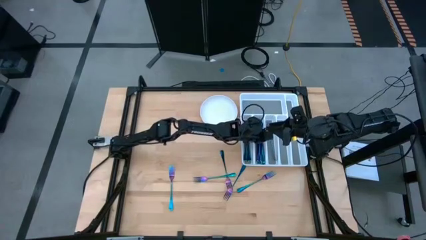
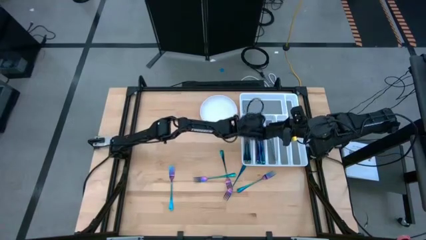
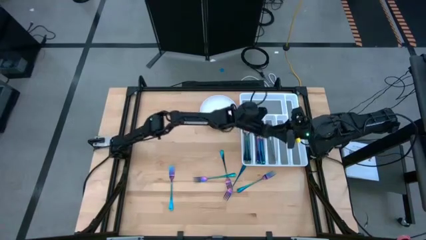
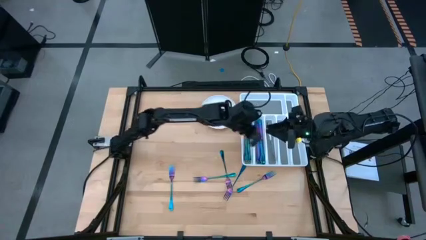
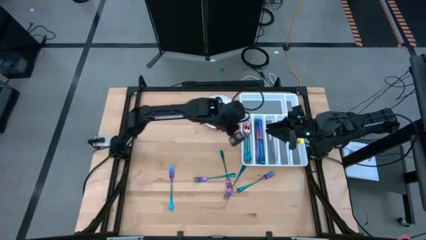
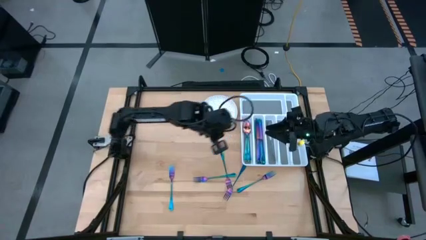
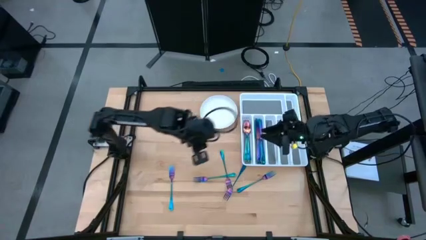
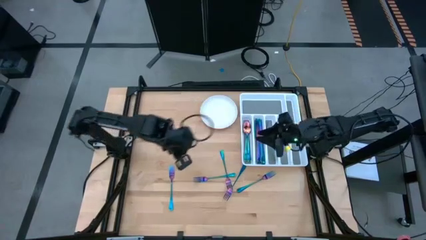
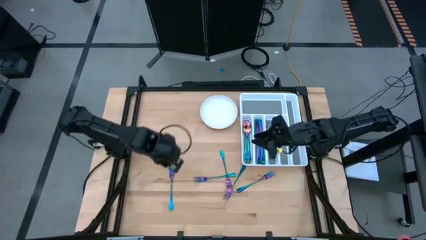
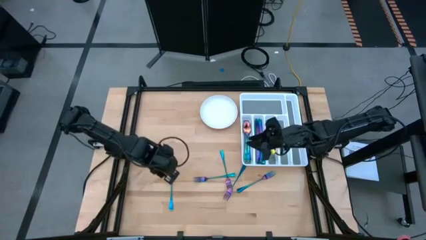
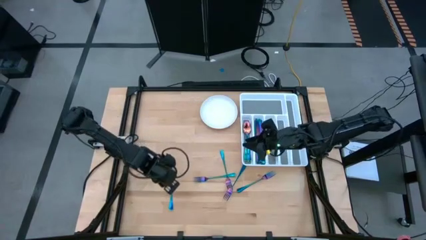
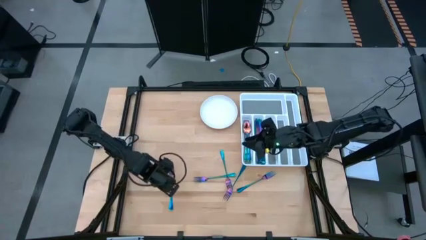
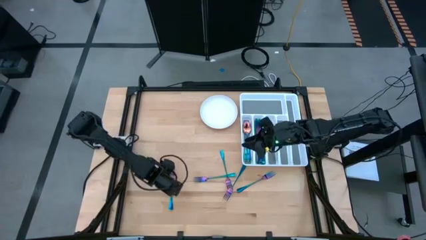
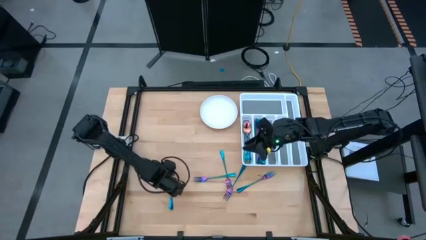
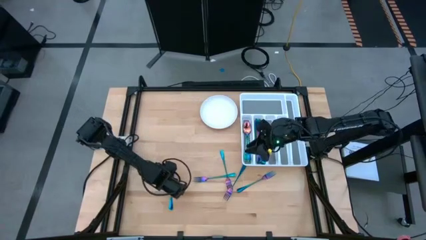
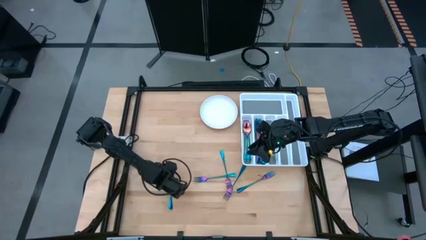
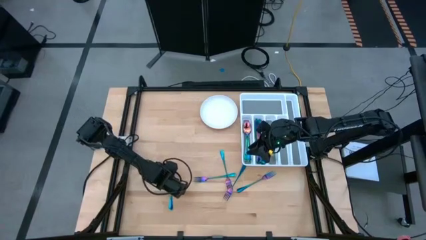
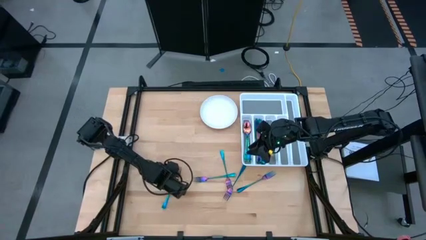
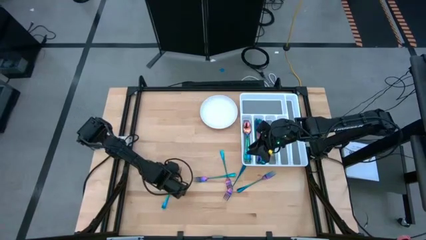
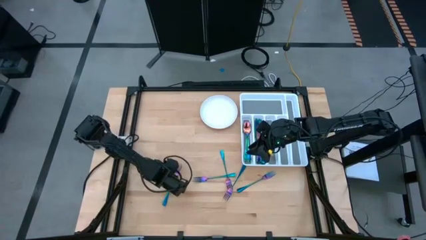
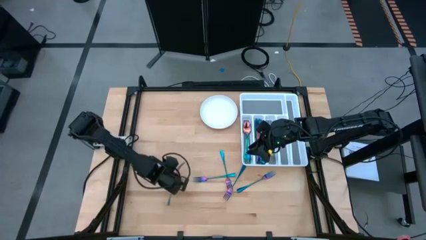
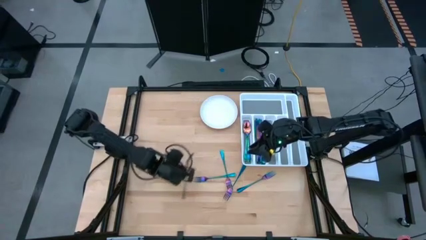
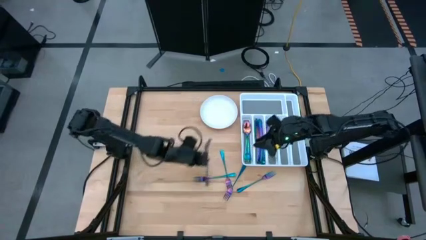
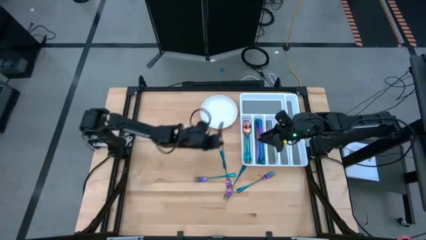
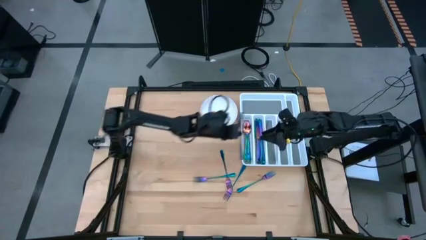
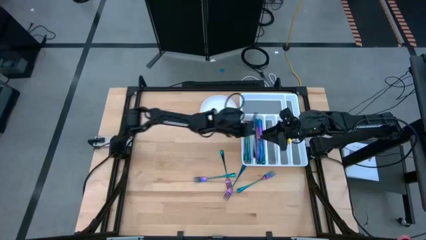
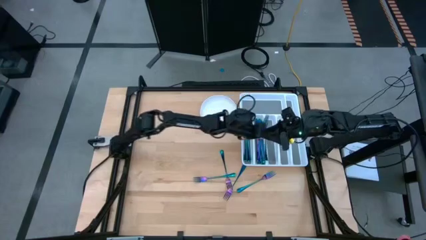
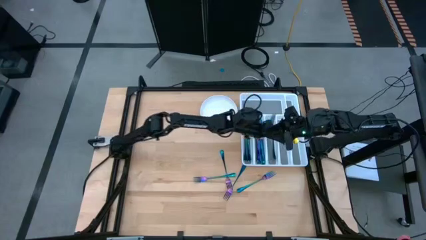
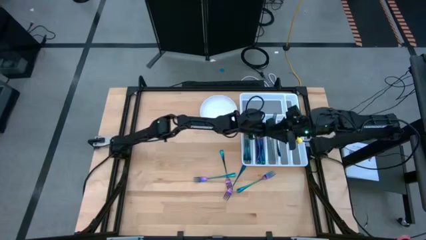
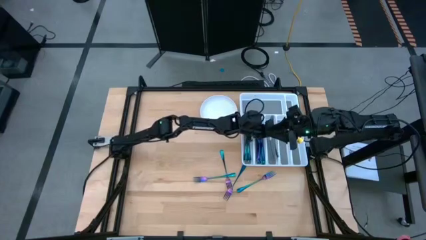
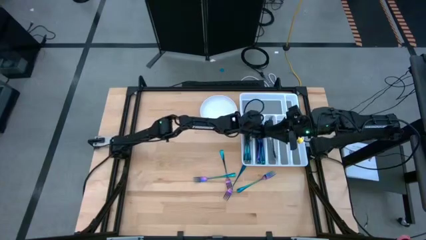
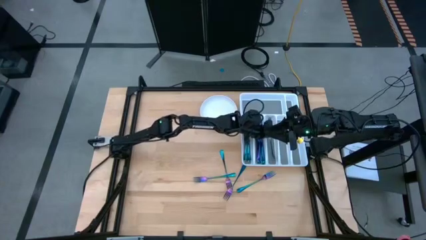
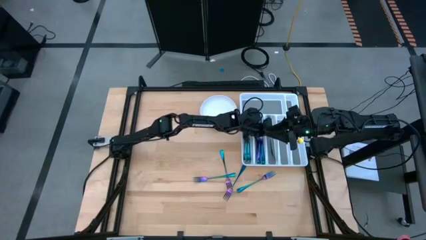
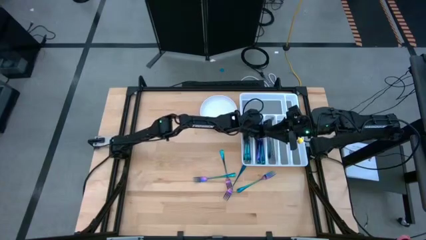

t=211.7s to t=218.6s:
Task: Sort silverware
Put the purple fork into the white silverware tray

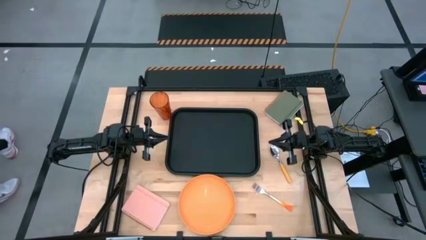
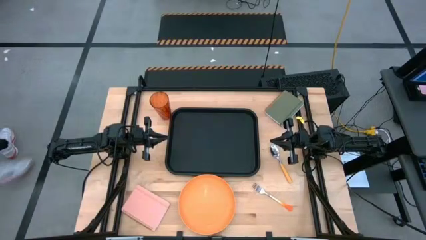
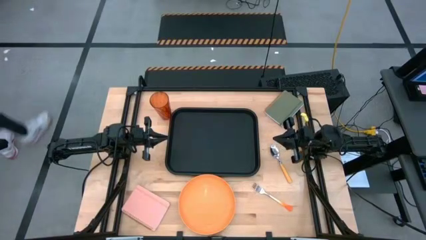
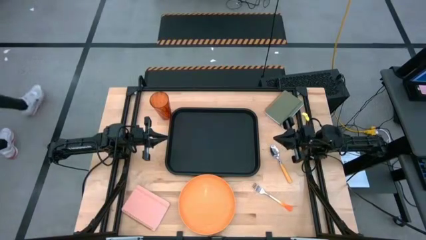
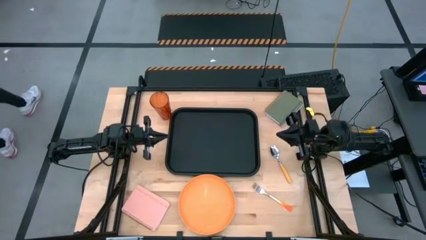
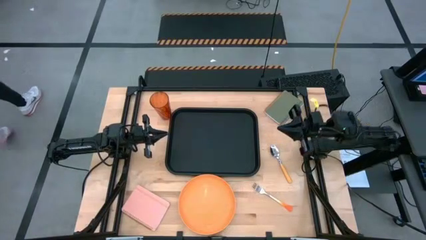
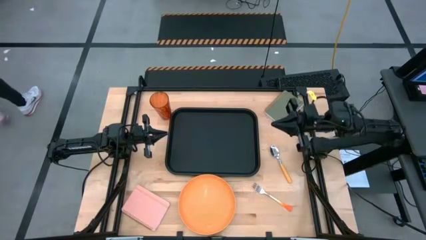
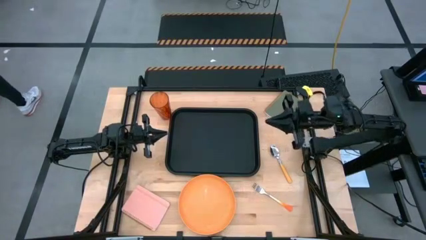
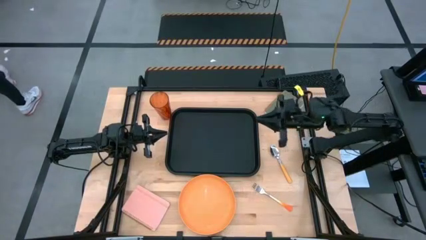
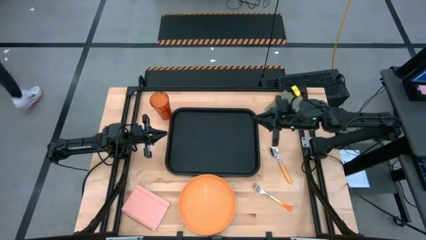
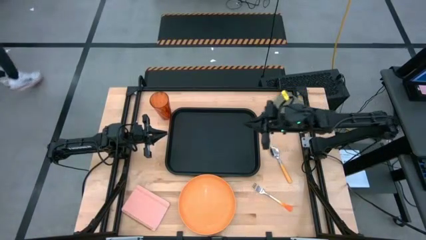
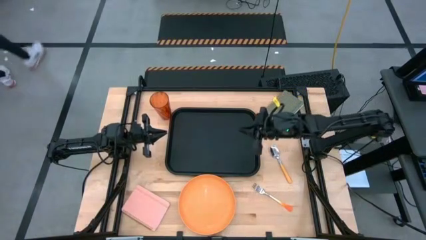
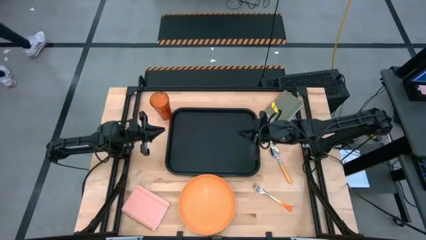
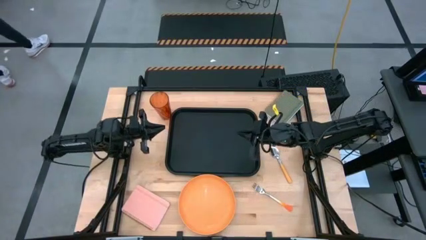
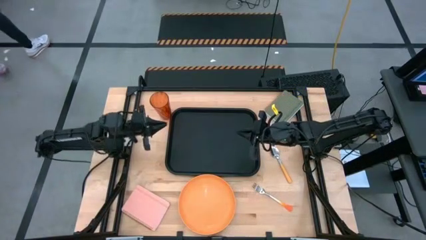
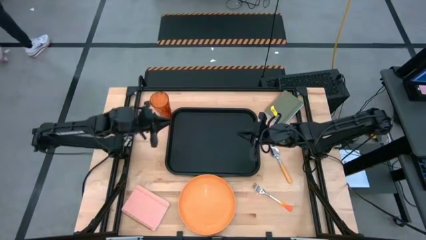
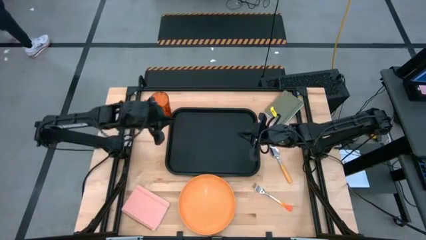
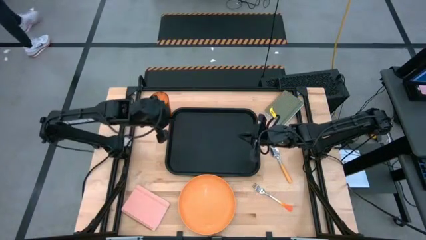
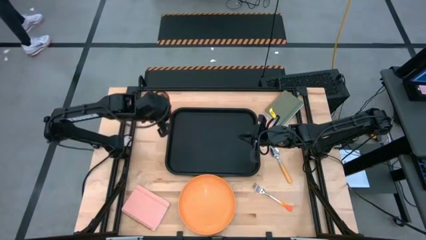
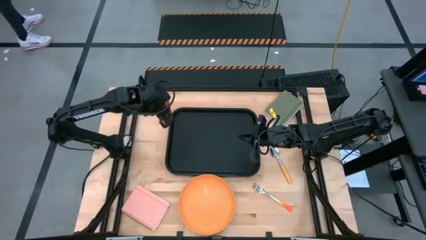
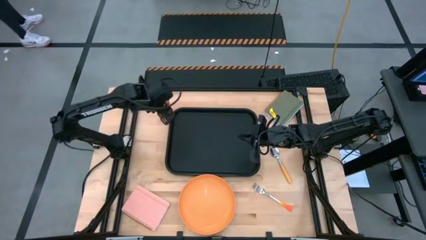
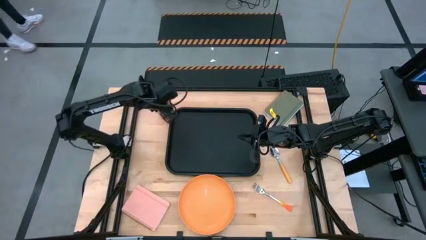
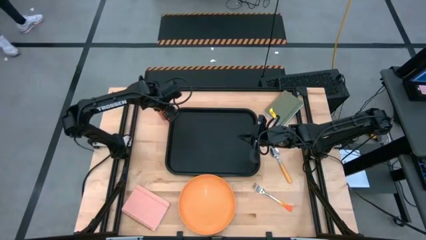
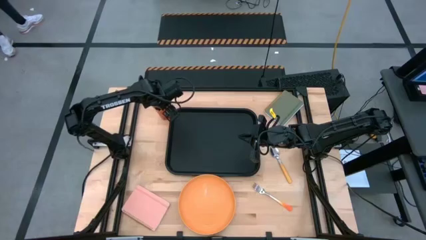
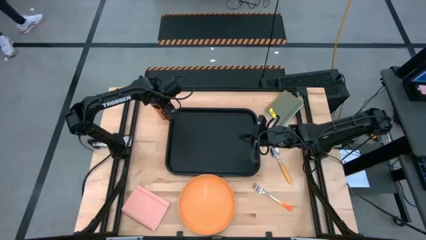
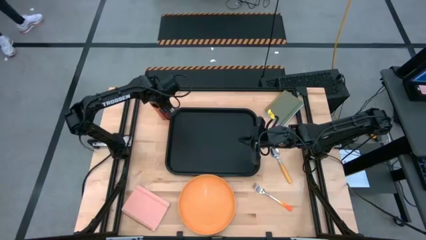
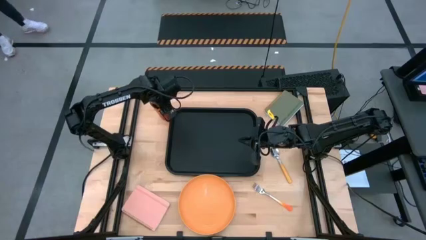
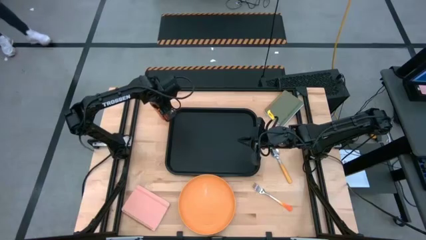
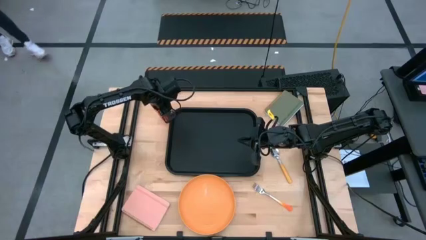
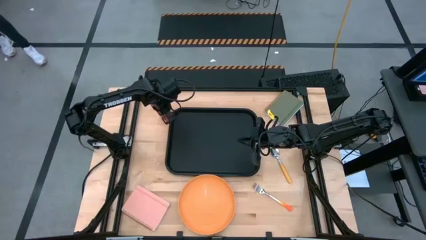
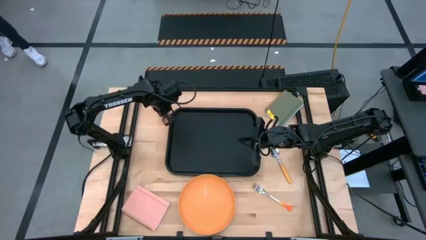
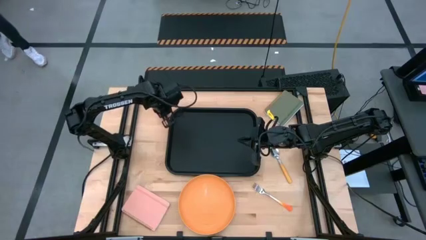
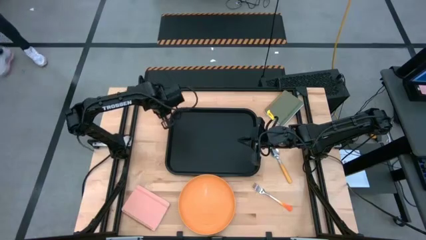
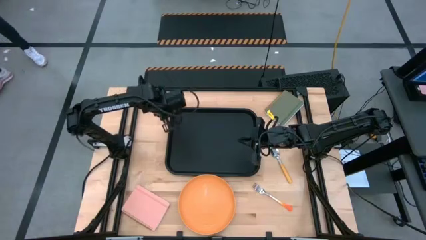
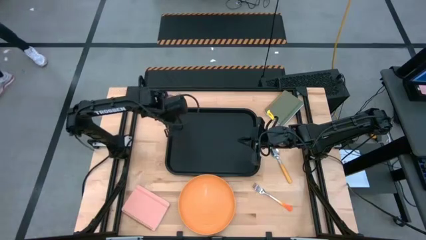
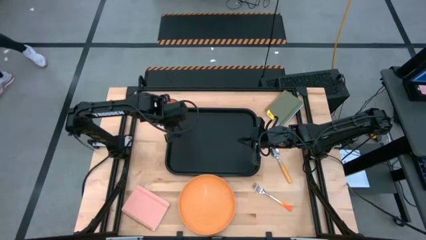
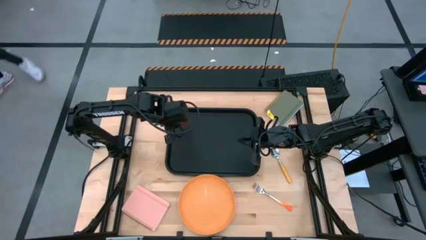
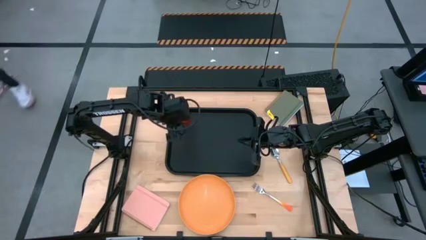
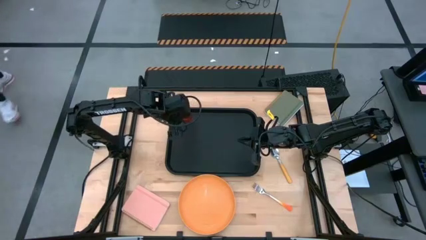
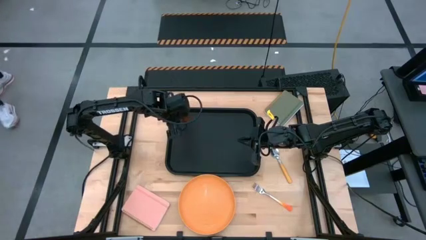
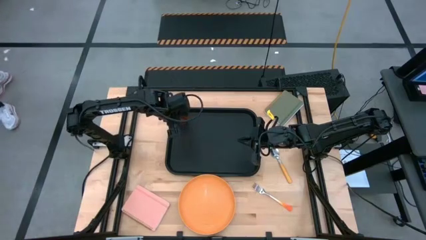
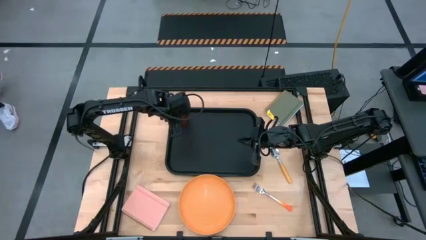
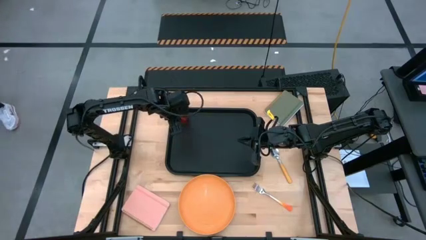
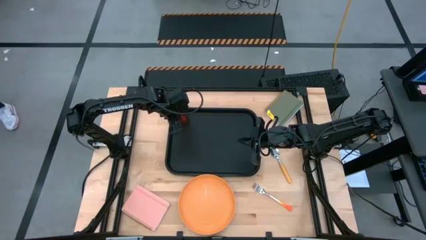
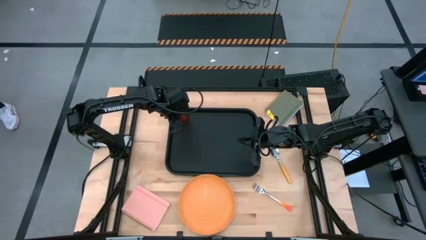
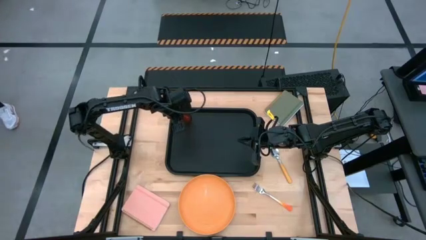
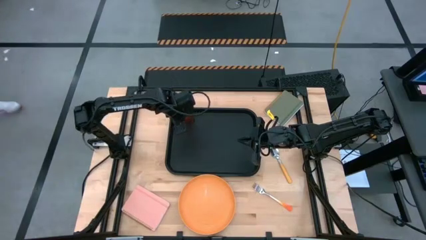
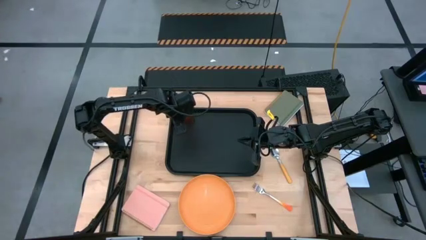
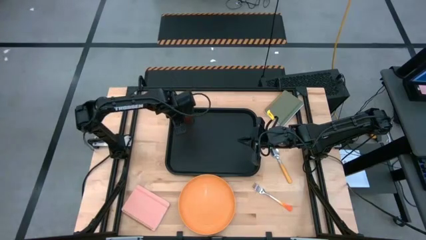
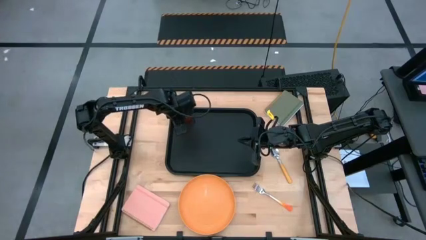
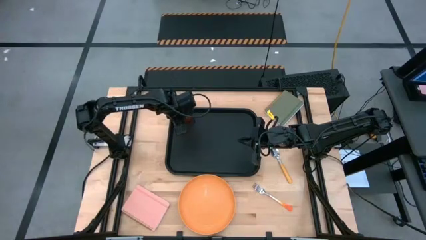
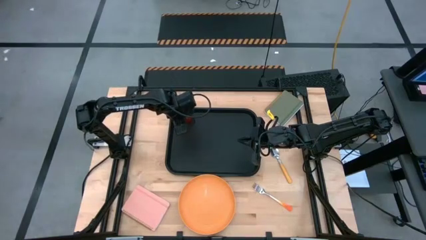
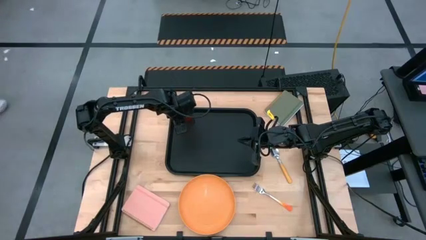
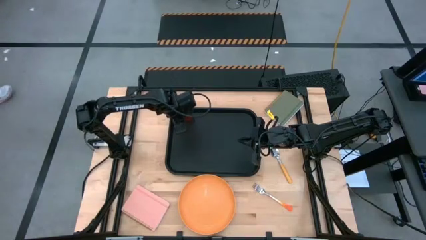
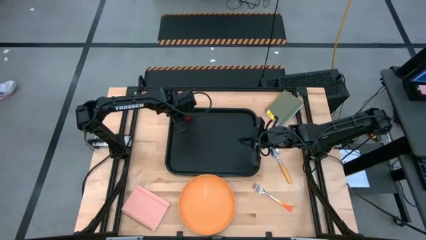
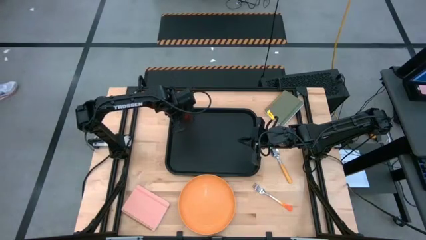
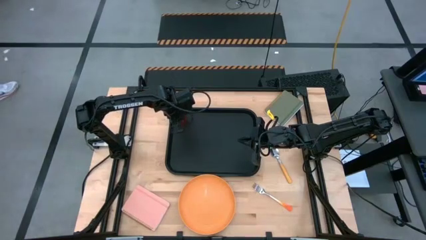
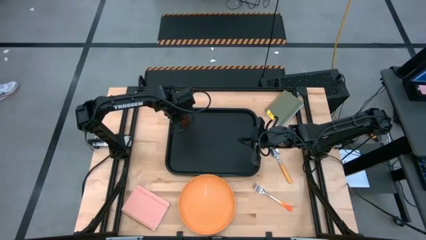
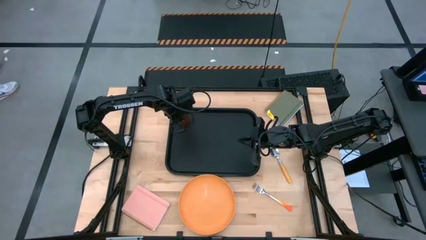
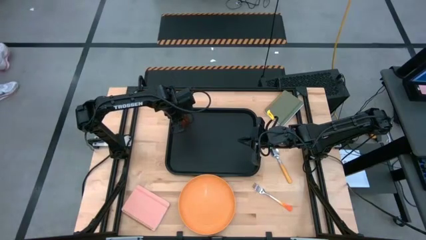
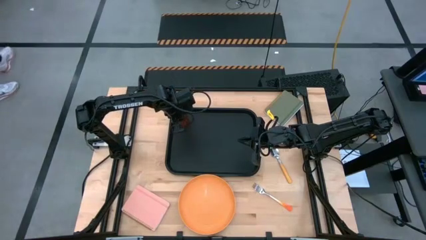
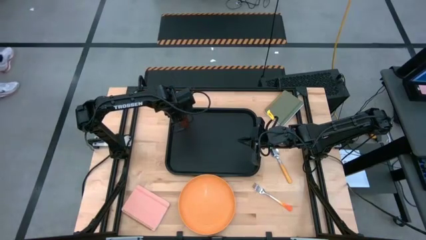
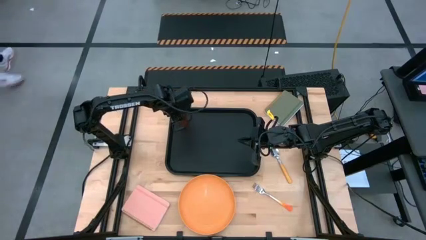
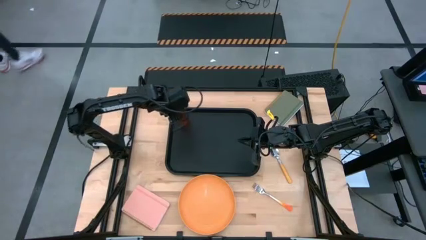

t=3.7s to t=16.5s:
Task: Pick and place plate/cup/fork/spoon on tray
Put the red cup on the black tray
